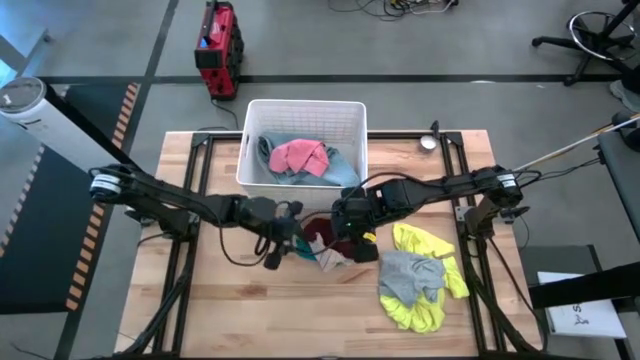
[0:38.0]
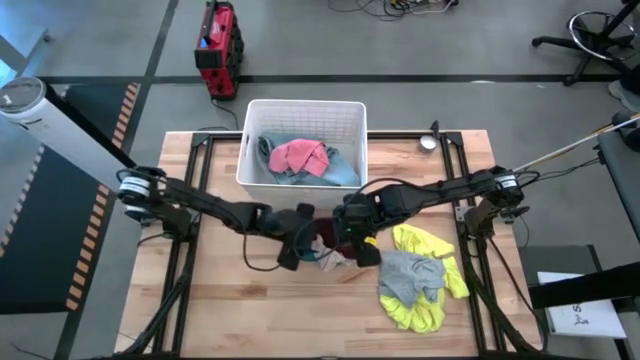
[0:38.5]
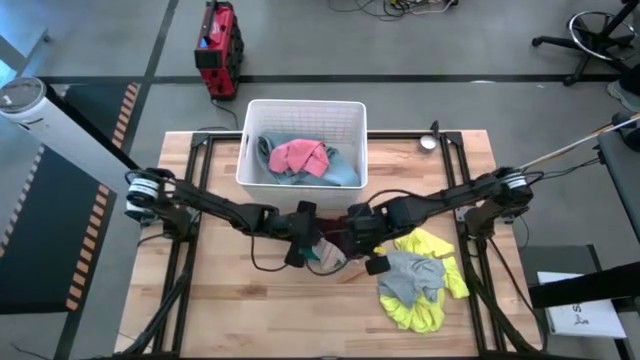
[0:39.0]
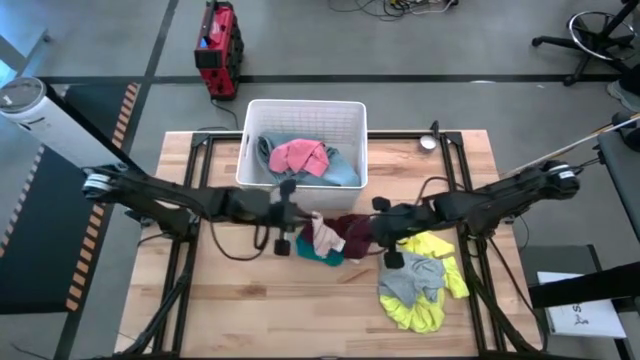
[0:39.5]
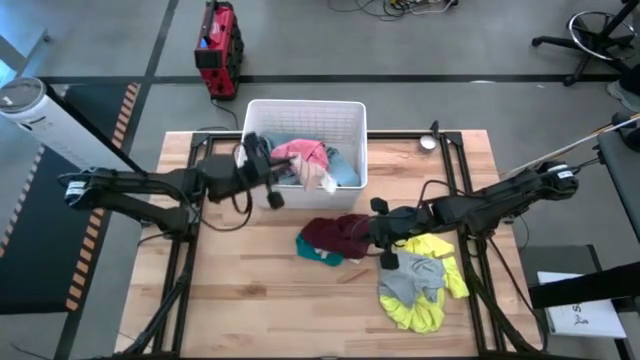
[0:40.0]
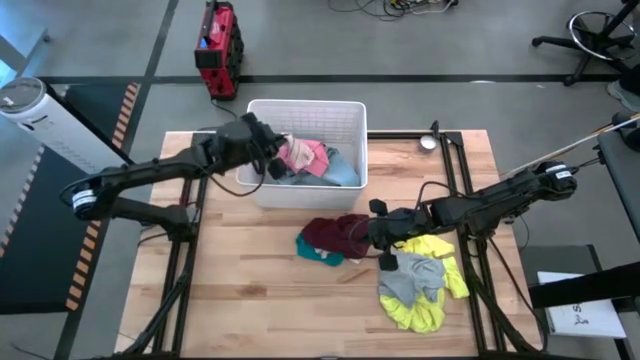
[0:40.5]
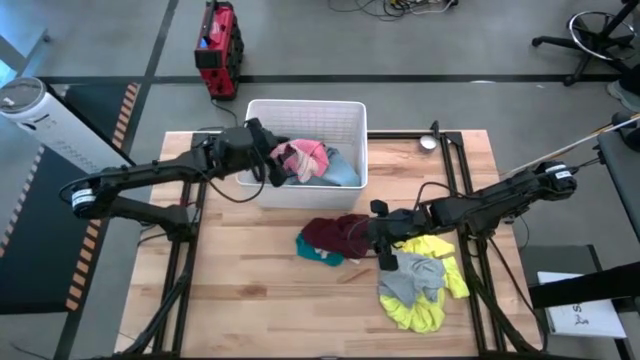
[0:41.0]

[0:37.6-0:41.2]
Task: Sort clothes
Put the white pattern sock into the white laundry bin

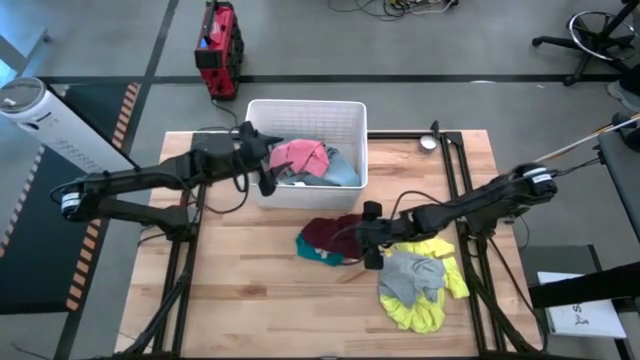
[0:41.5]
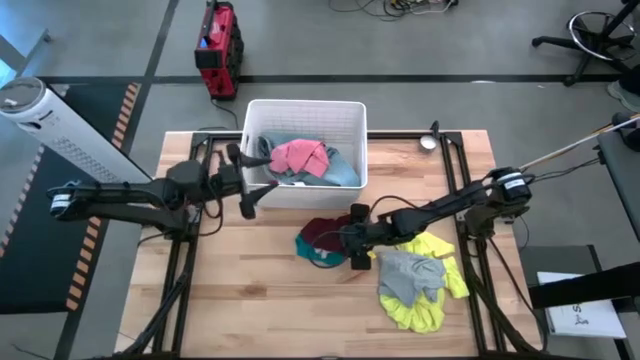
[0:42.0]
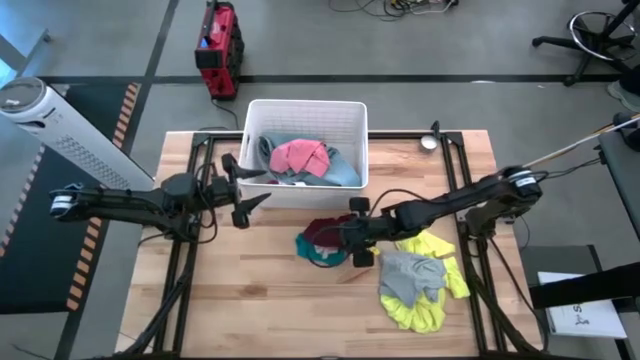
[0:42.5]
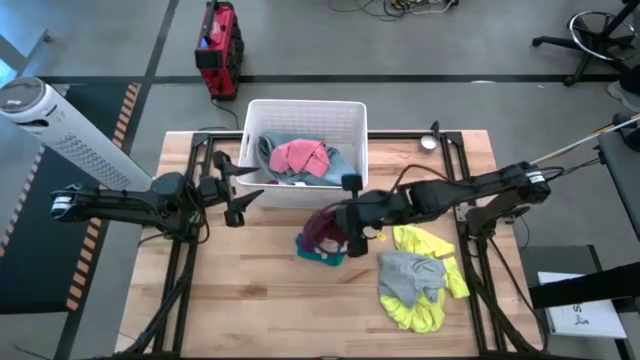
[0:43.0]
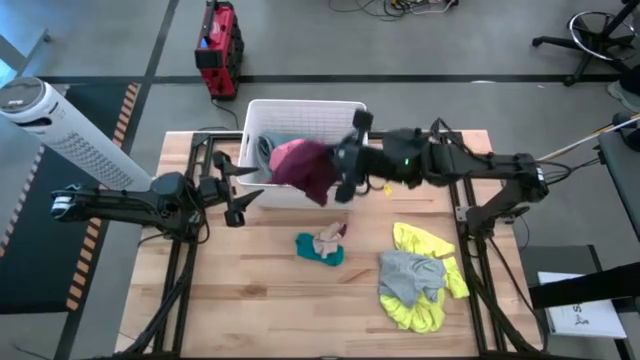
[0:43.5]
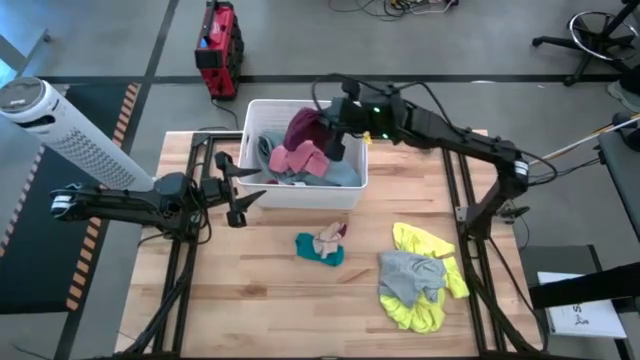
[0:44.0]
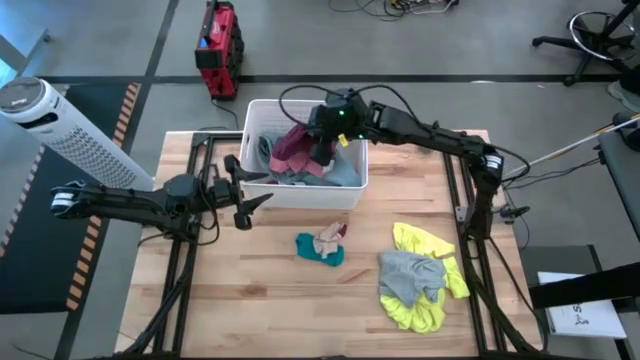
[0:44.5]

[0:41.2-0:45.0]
Put the dark red shorts into the white laundry bin

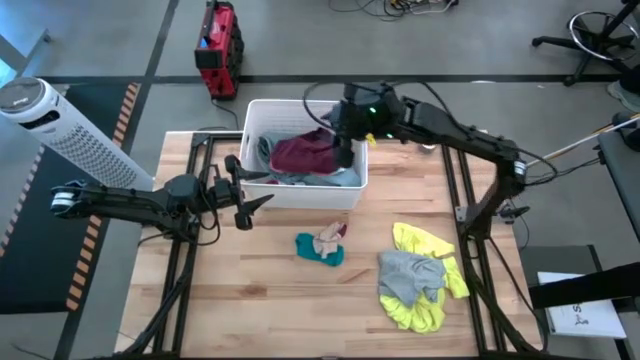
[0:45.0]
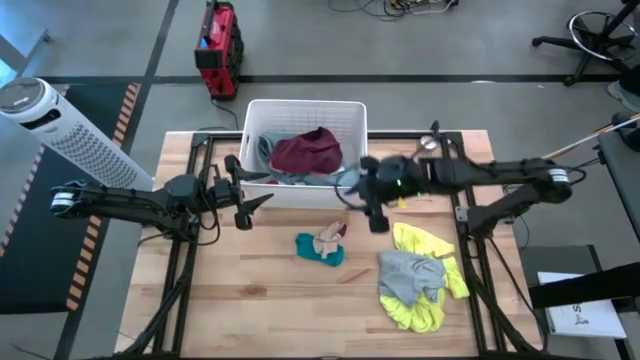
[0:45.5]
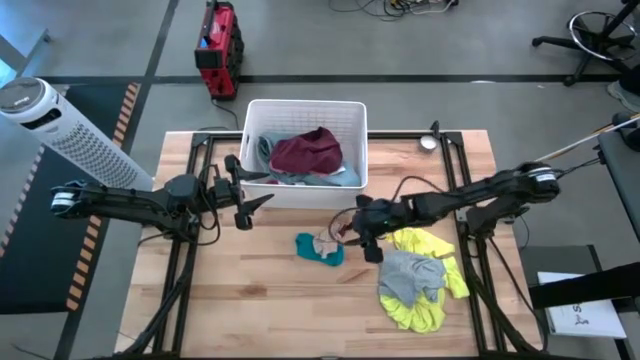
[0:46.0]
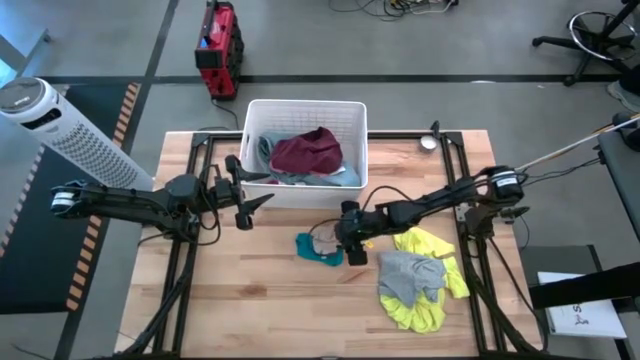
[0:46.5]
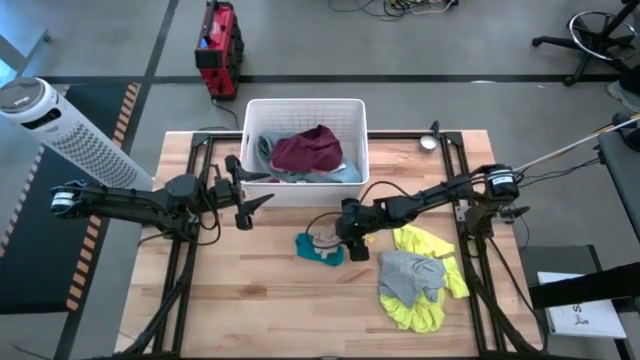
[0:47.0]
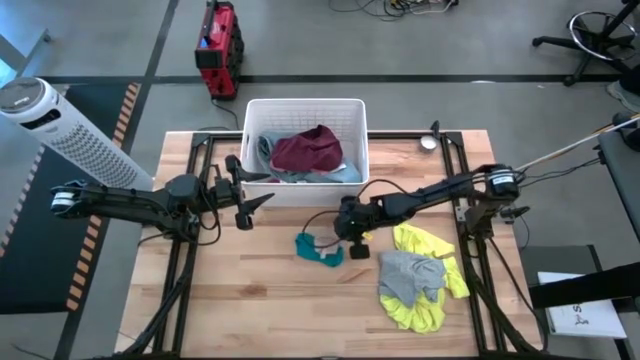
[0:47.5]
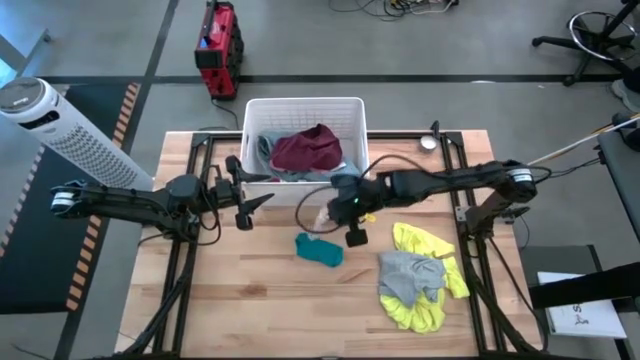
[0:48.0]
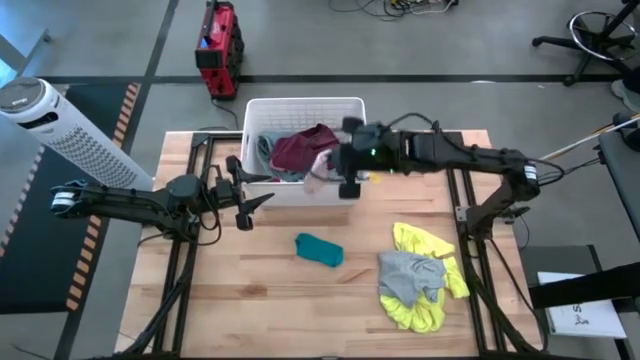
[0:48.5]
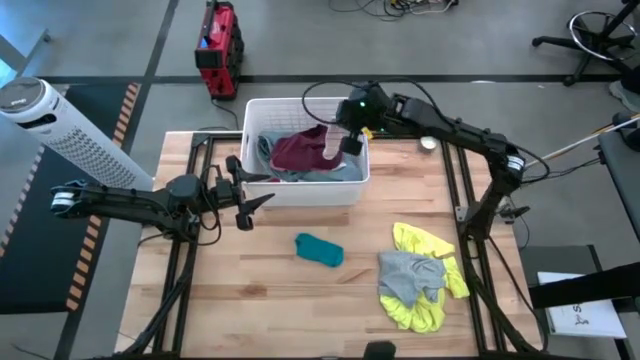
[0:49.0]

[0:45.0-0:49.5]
Put the white pattern sock into the white laundry bin

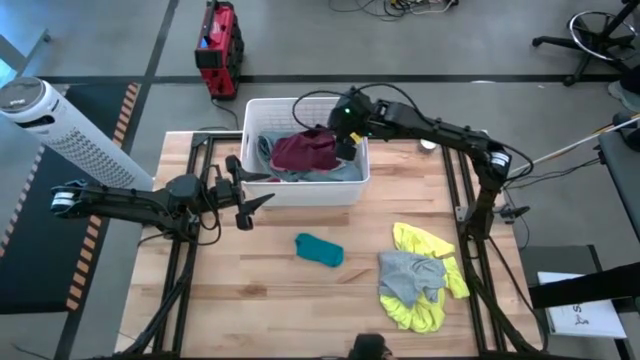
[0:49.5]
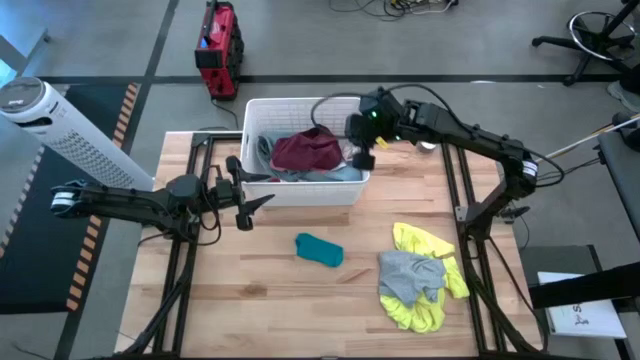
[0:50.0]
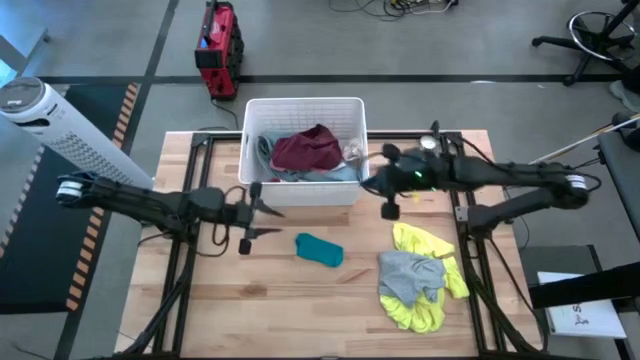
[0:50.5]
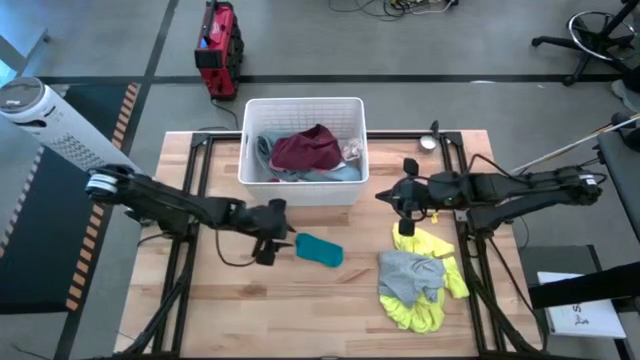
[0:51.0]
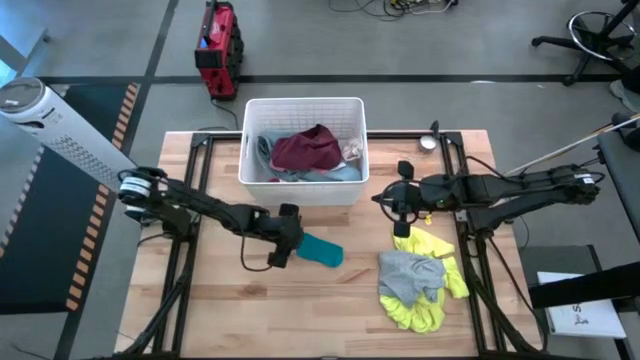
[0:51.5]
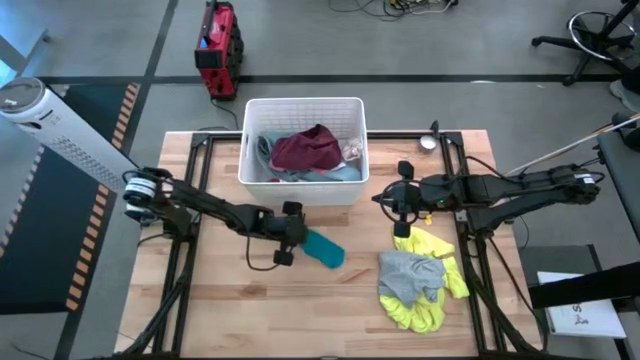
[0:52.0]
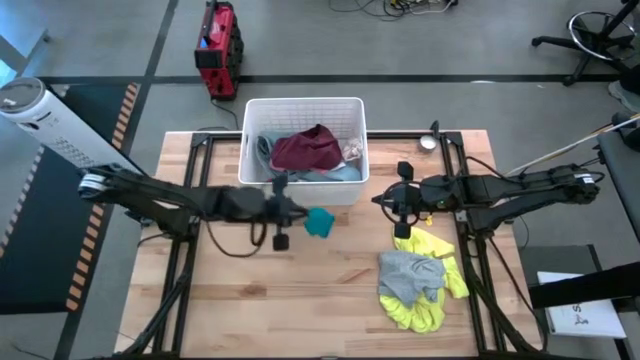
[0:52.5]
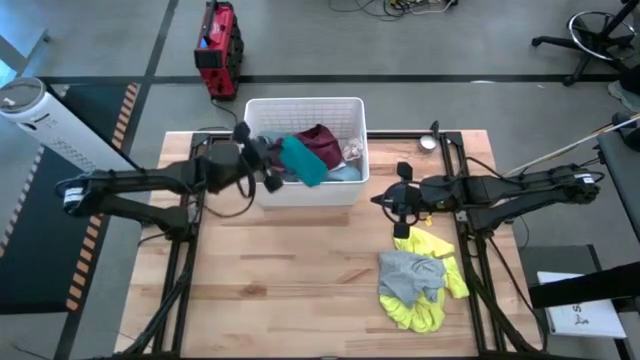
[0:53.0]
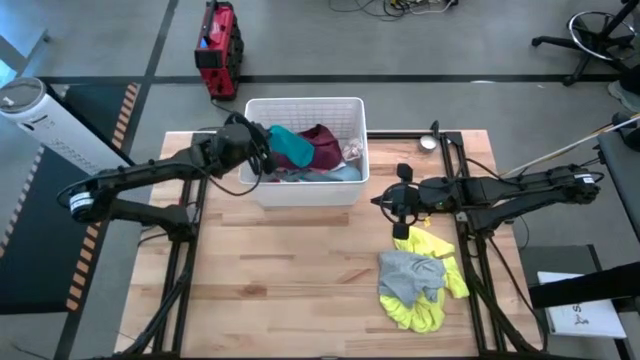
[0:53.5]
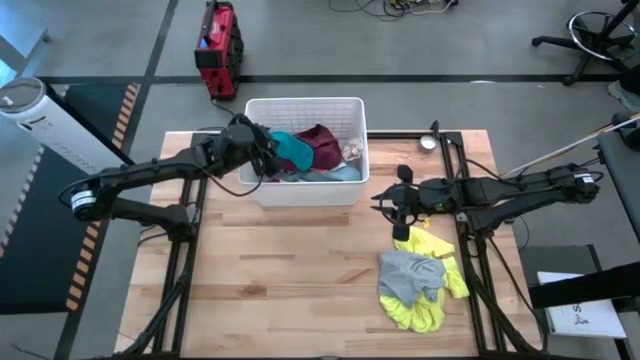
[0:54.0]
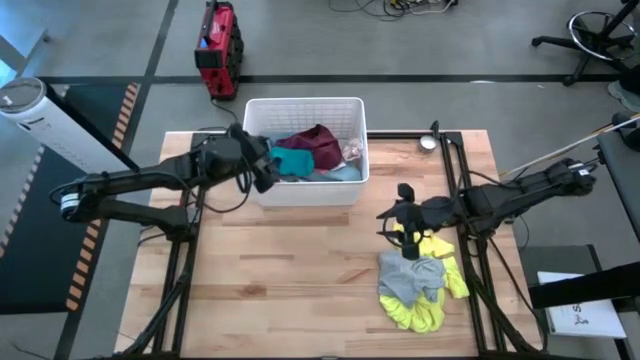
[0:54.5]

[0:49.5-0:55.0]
Put the blue sock into the white laundry bin

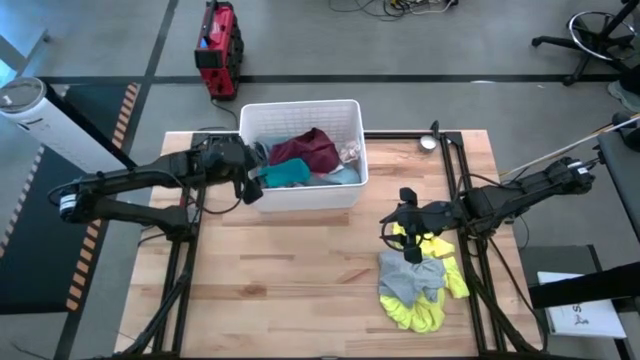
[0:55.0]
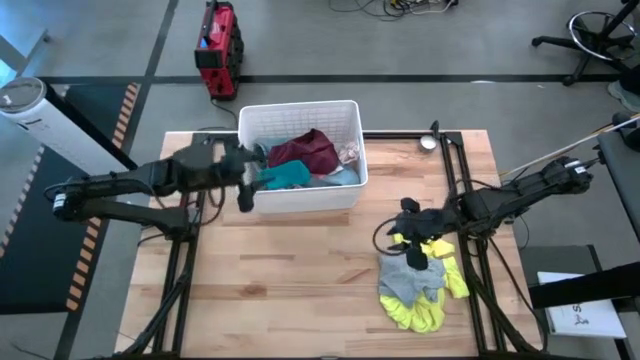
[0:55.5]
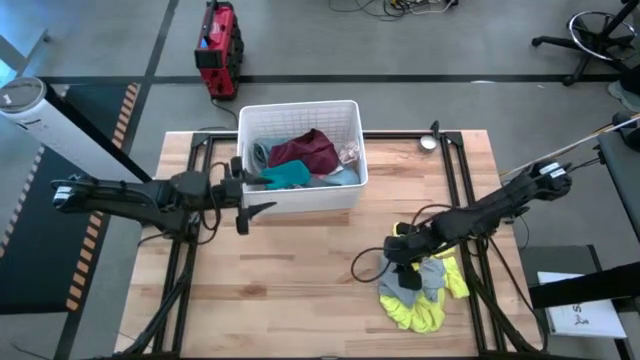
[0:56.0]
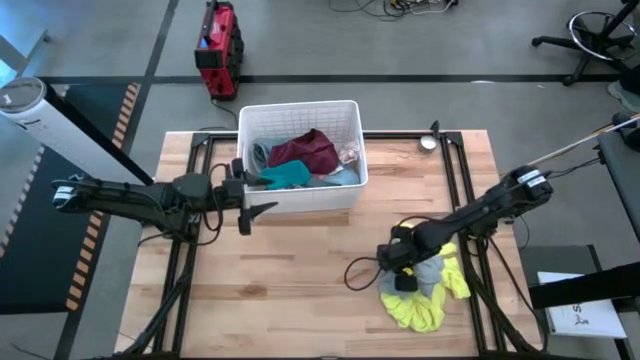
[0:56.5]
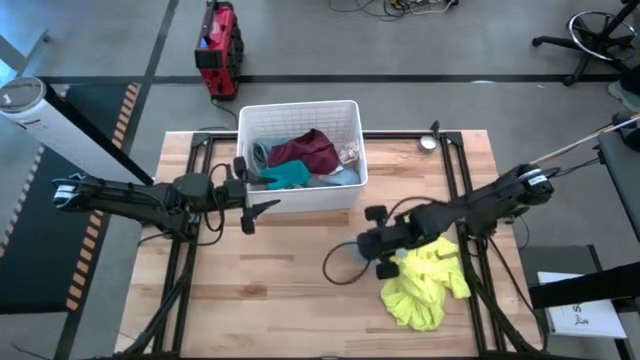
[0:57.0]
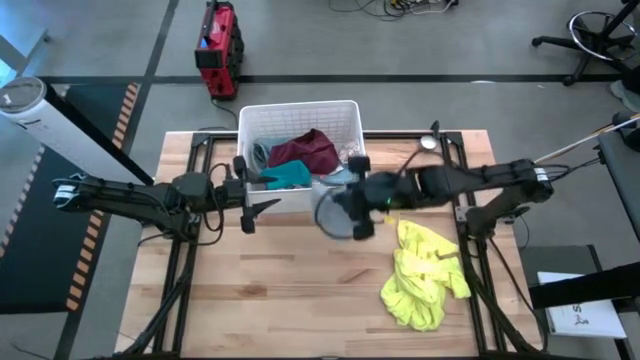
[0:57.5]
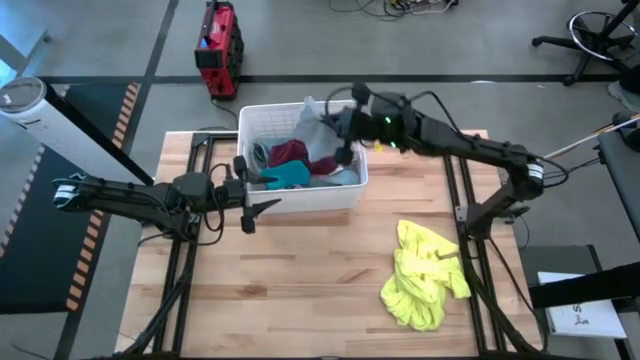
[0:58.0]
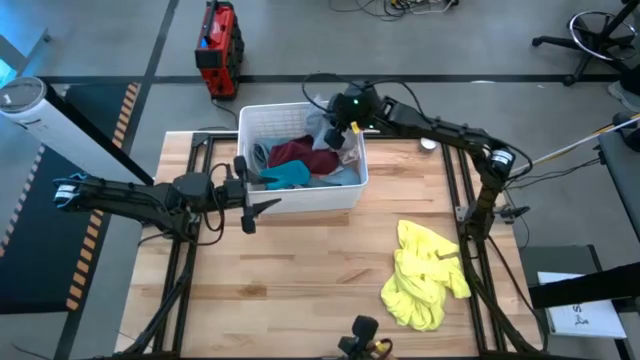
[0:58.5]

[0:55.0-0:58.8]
Put the gray shirt into the white laundry bin
